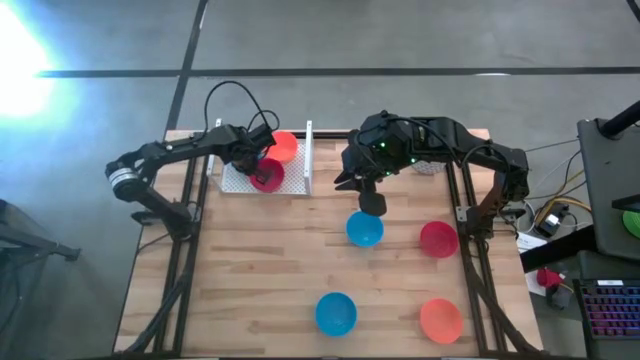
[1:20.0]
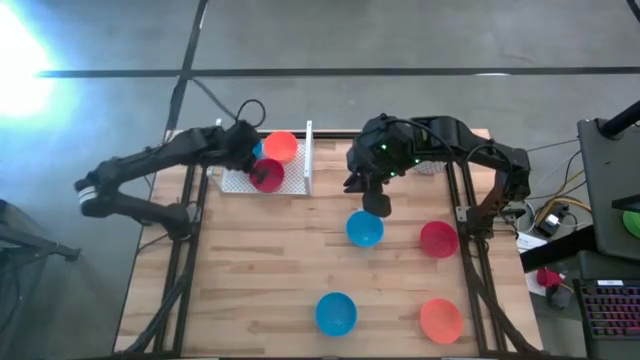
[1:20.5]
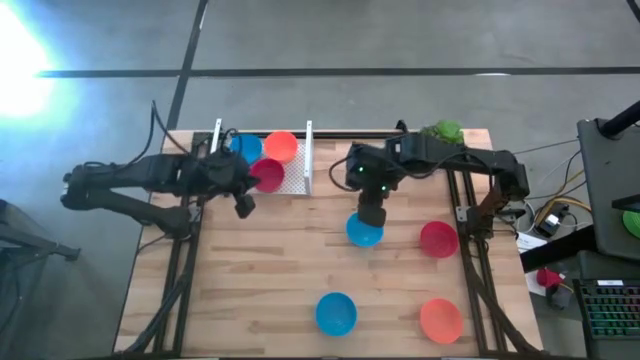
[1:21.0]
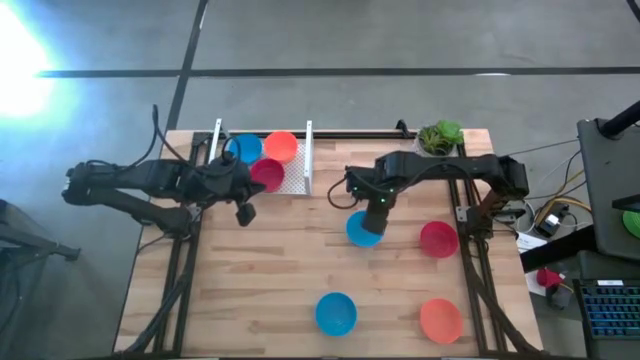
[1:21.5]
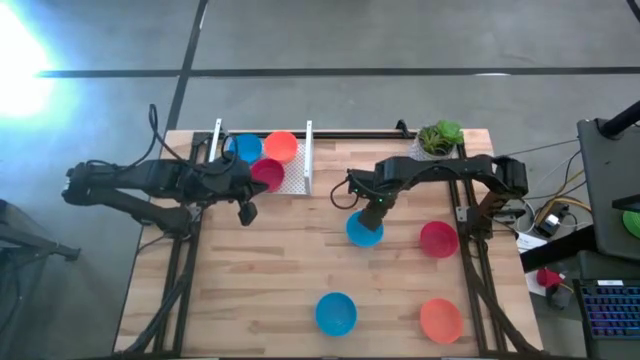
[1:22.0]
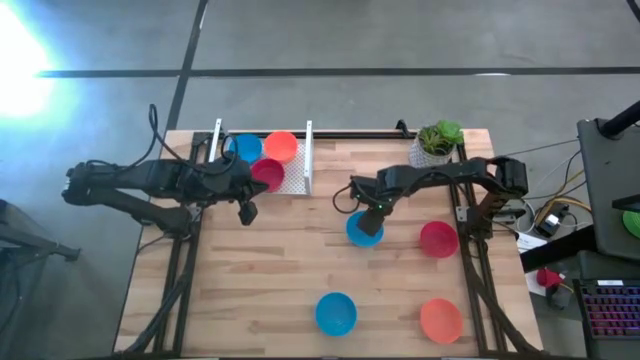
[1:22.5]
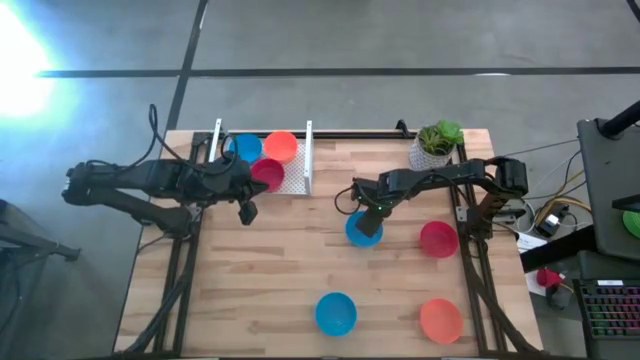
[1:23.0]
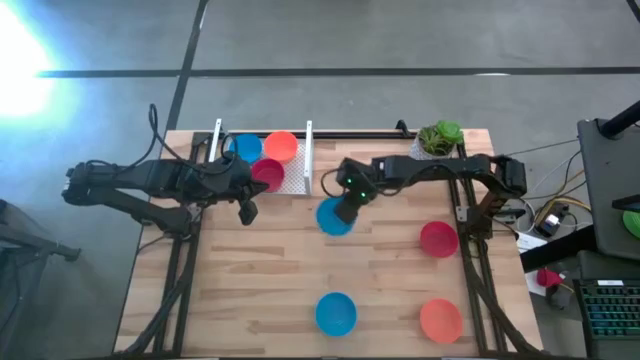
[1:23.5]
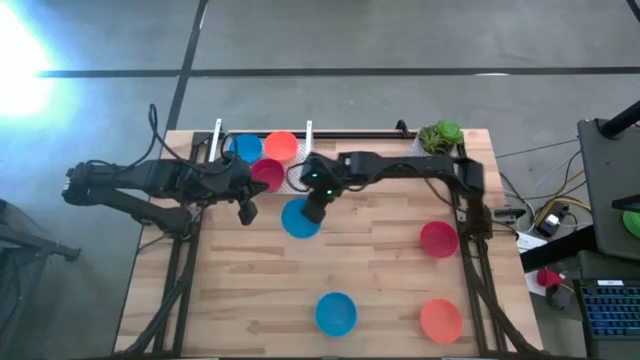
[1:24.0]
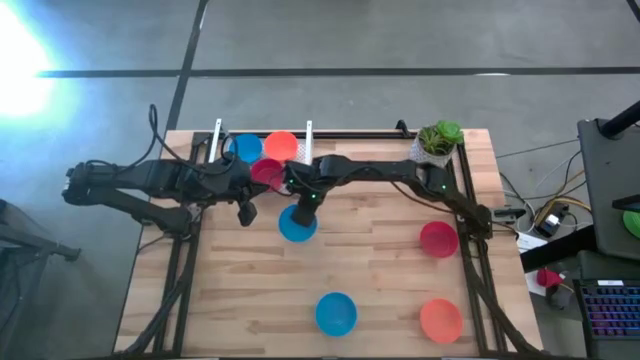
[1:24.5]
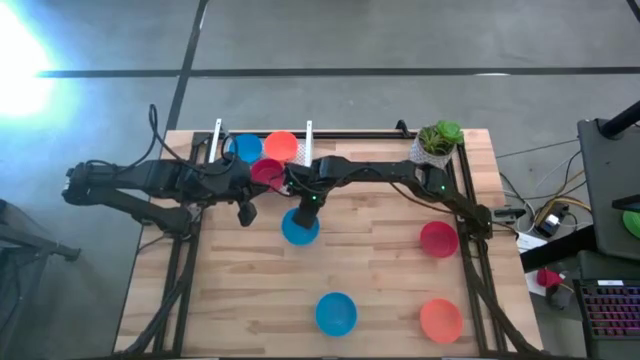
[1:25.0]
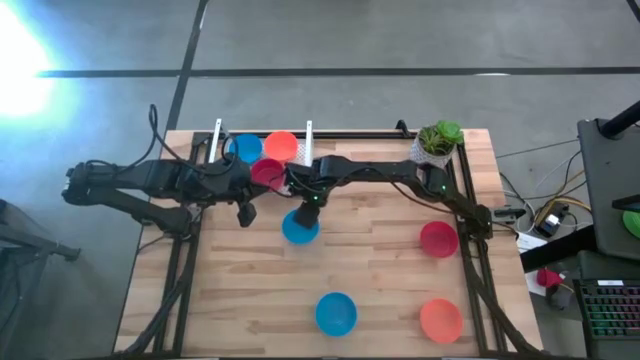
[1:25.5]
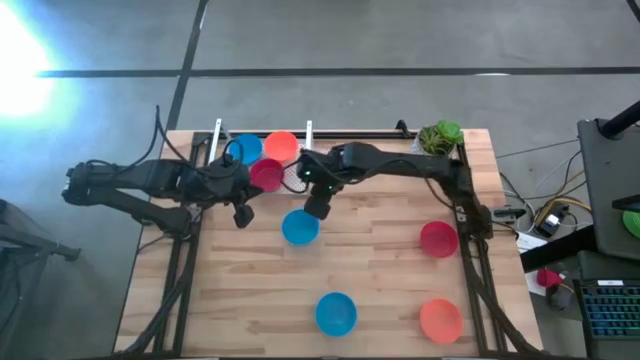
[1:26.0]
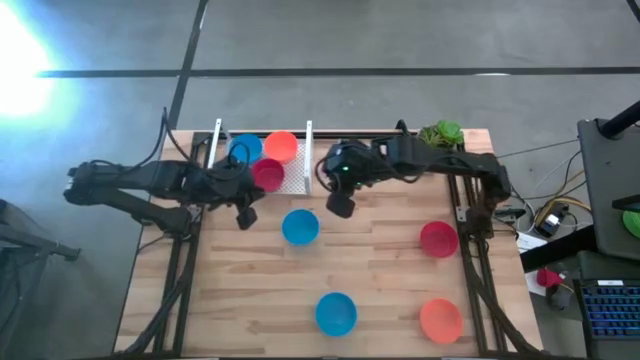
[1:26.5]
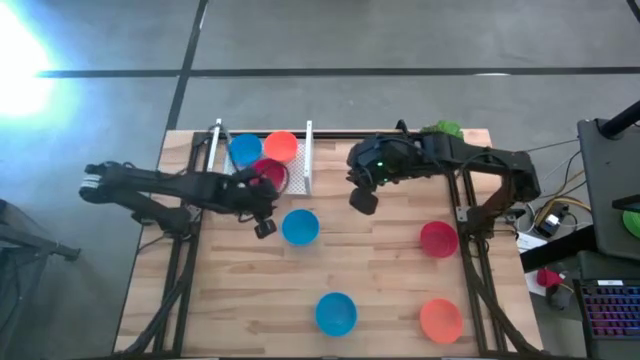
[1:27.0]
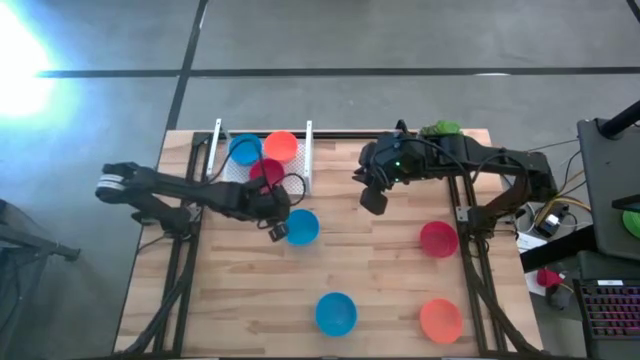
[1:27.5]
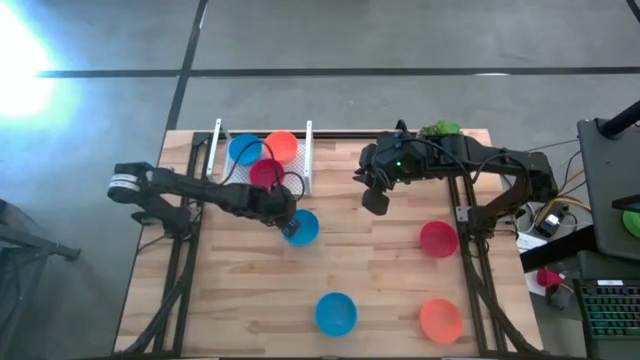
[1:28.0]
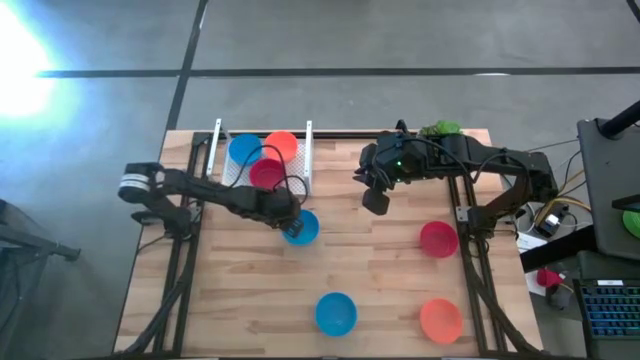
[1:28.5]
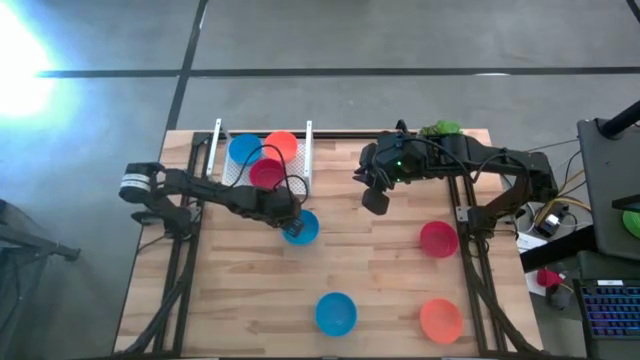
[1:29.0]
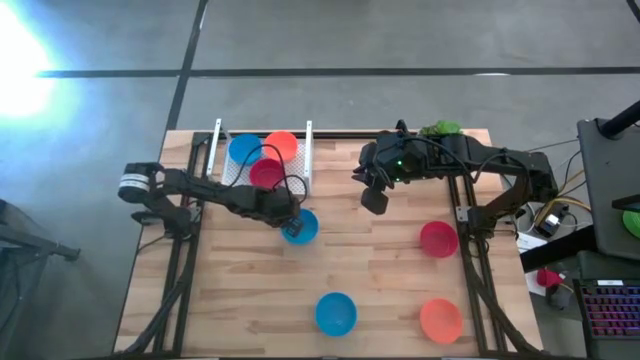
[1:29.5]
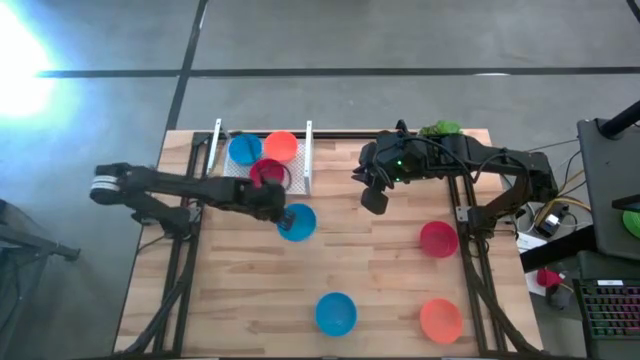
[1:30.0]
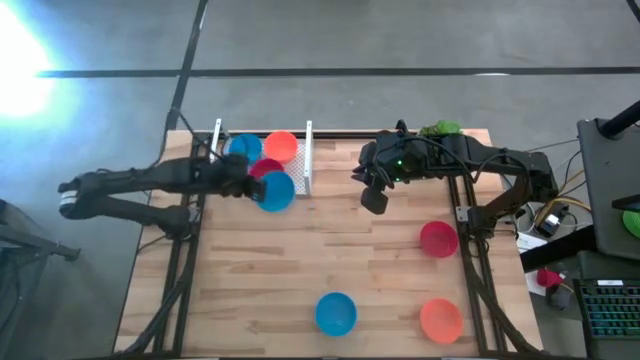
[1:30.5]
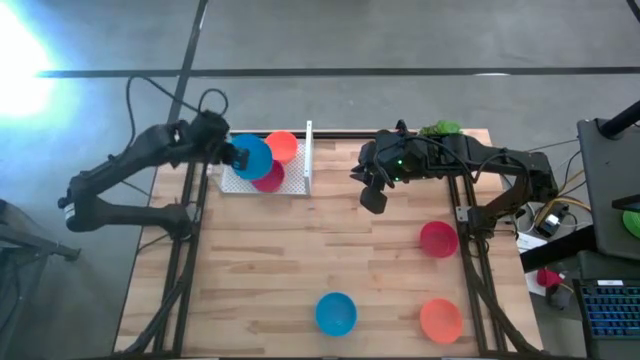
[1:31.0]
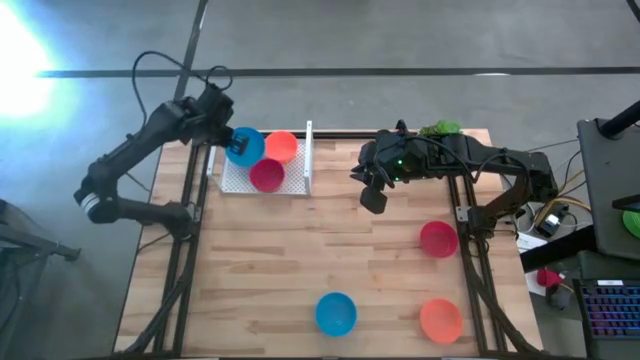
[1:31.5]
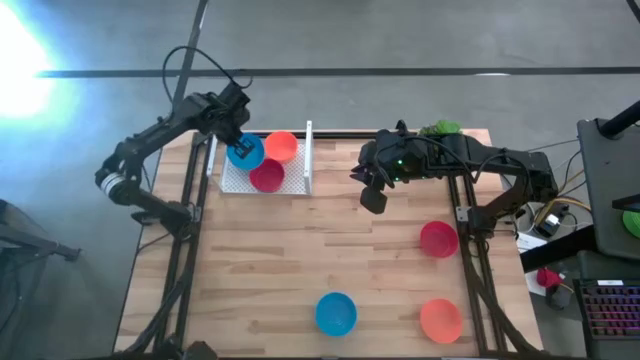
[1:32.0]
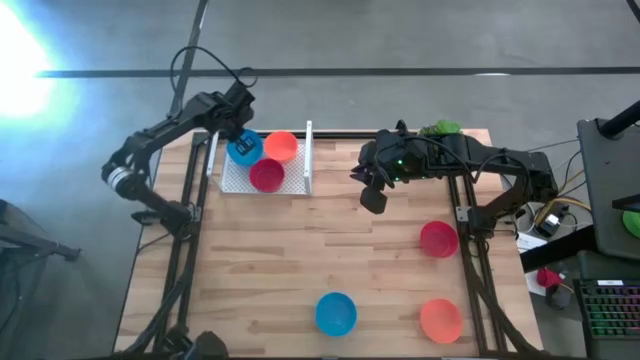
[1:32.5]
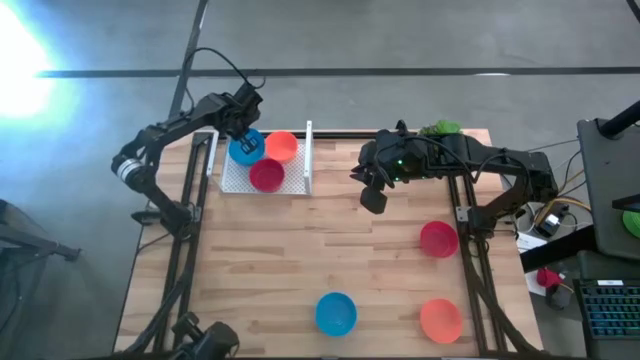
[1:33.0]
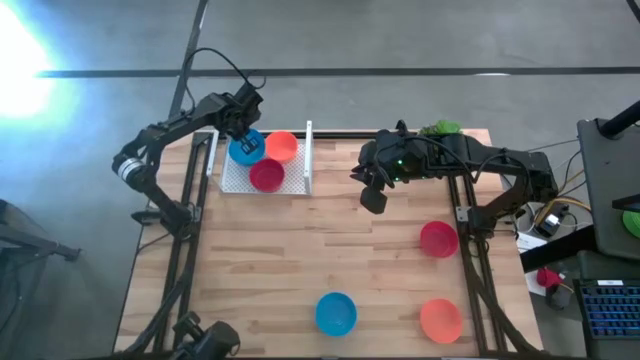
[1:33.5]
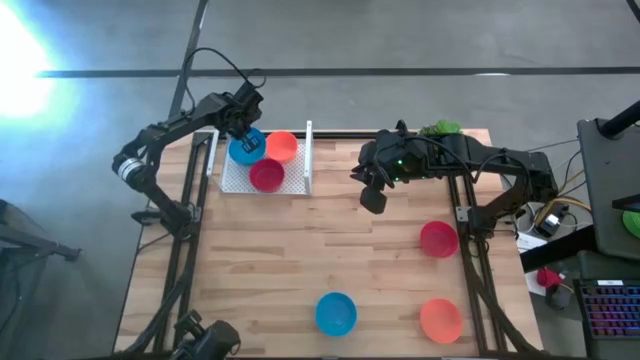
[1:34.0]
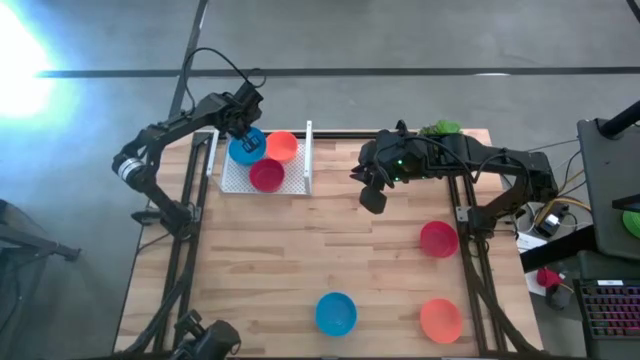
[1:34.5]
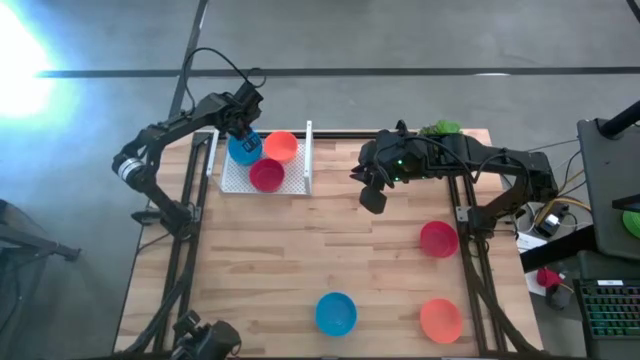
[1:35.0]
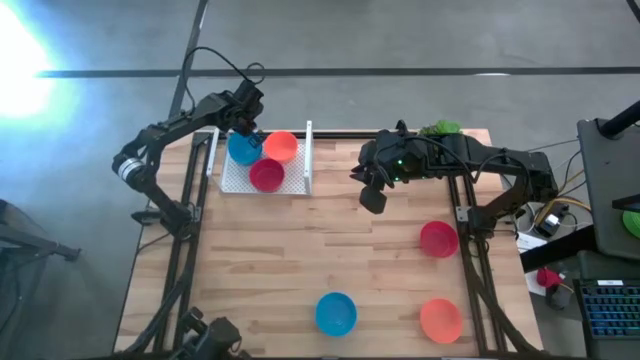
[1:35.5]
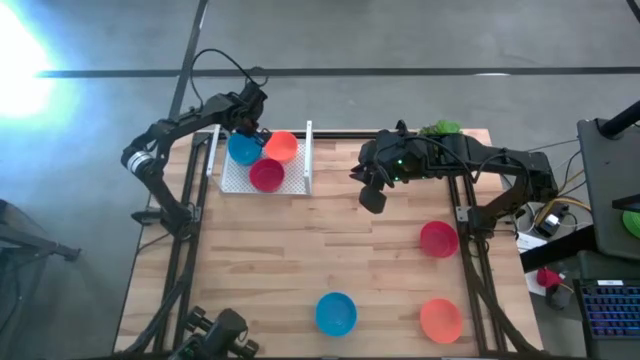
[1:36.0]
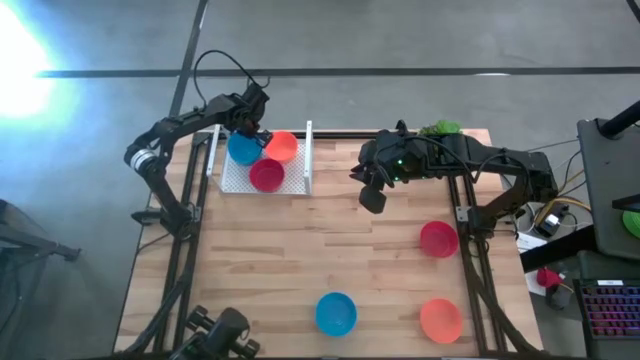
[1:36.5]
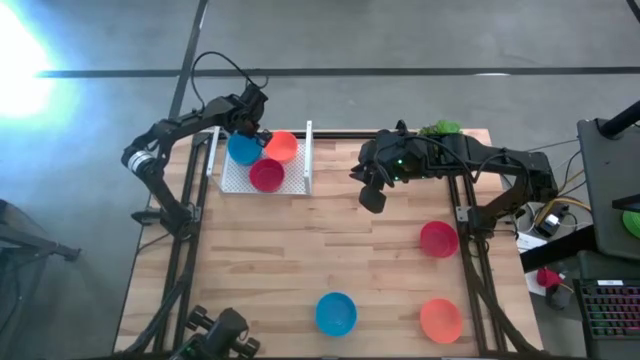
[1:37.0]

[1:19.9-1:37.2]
Task: Pick & Place Mini bowls
Stack the top blue bowl on the blue bowl on the shelf

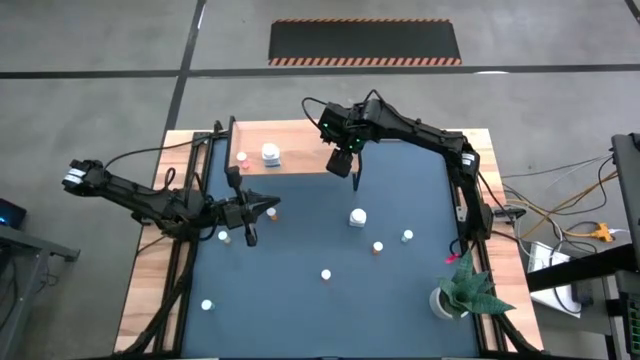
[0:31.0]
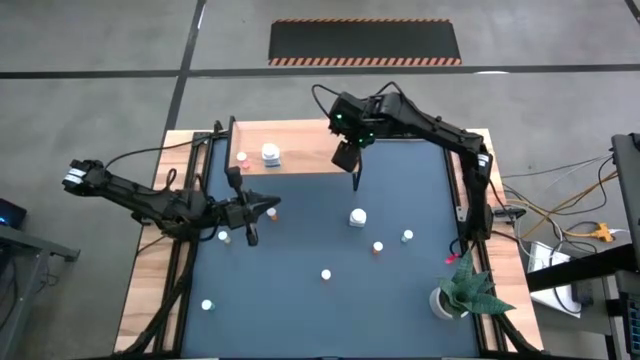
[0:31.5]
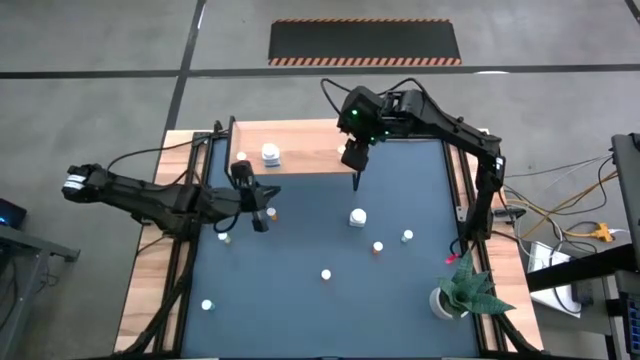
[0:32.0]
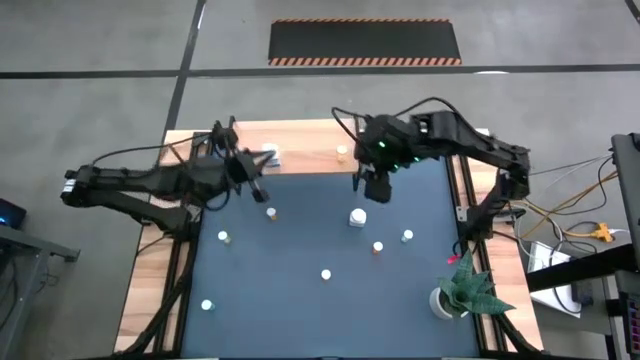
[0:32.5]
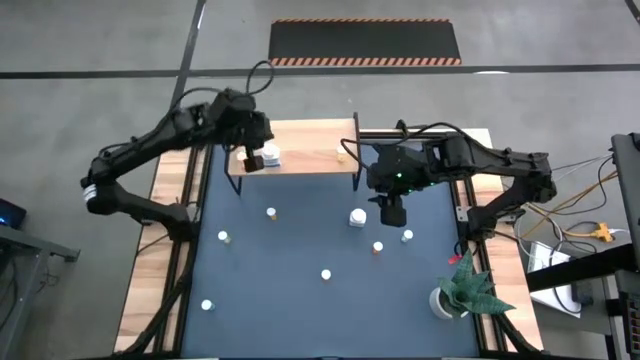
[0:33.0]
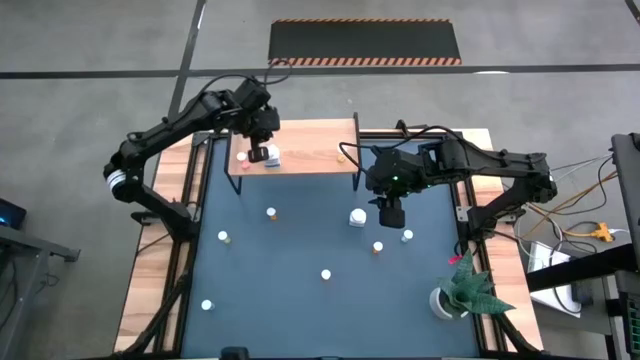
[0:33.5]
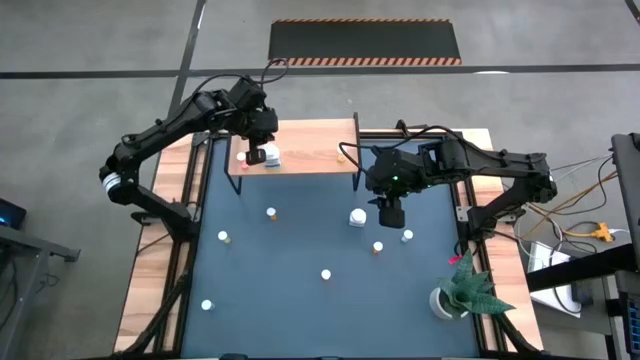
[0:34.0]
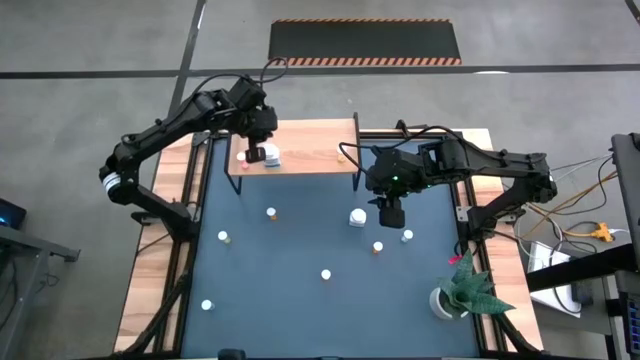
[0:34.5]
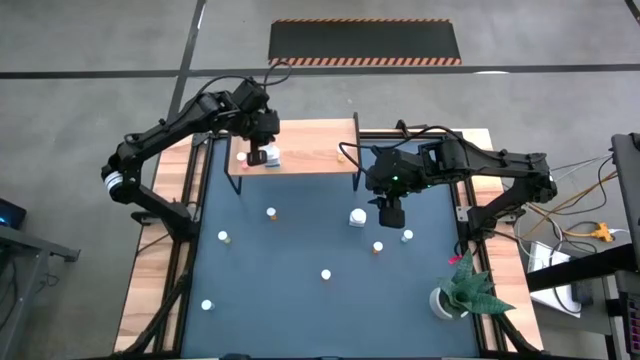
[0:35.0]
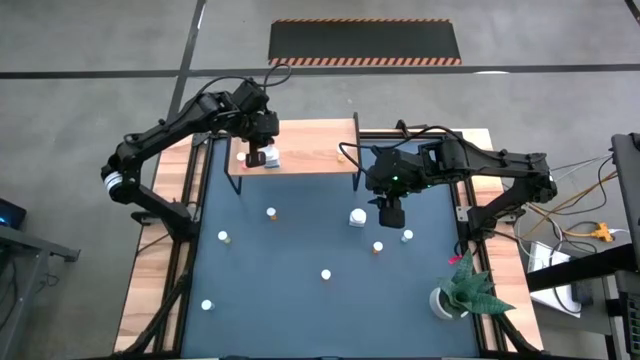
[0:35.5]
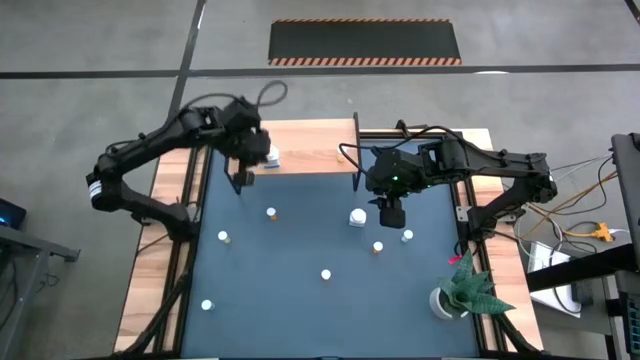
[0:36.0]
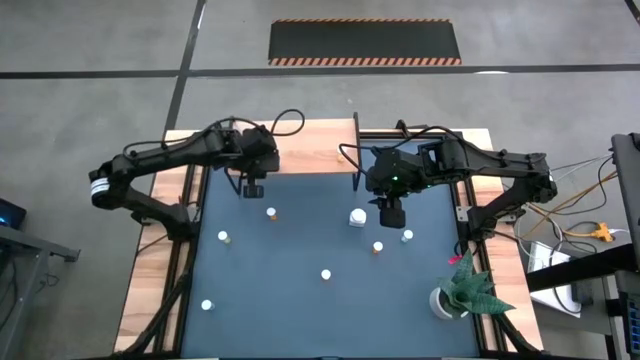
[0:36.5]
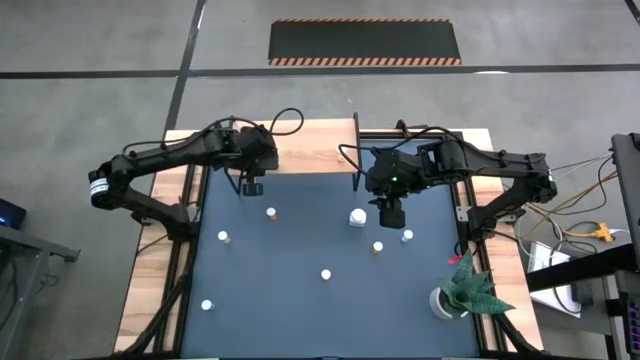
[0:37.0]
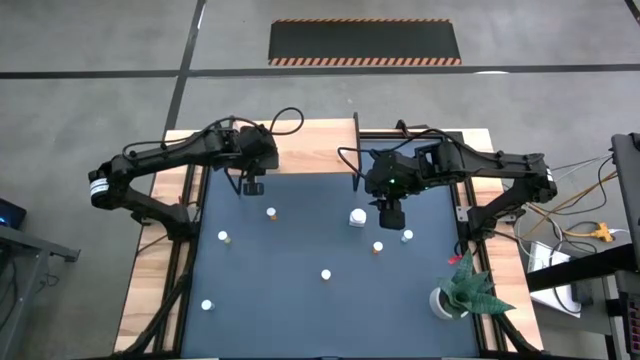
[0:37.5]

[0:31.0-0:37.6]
Task: Pick and place medicine bottles onto shelf by color
Adjust the white pill bottle on the shelf
